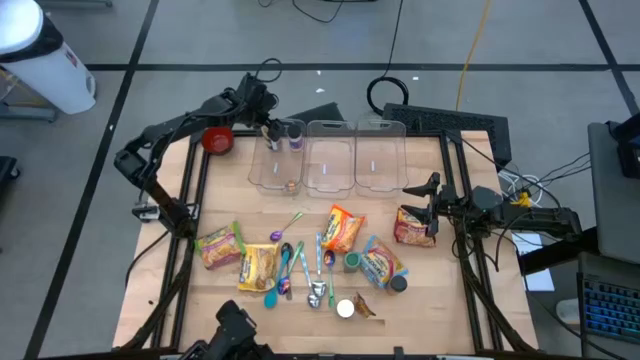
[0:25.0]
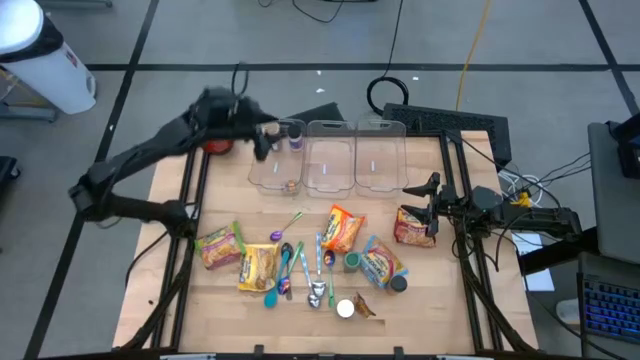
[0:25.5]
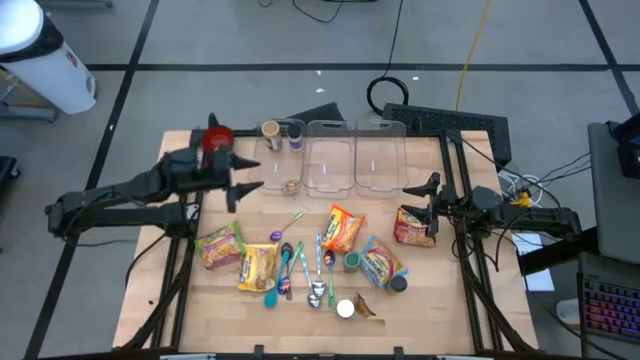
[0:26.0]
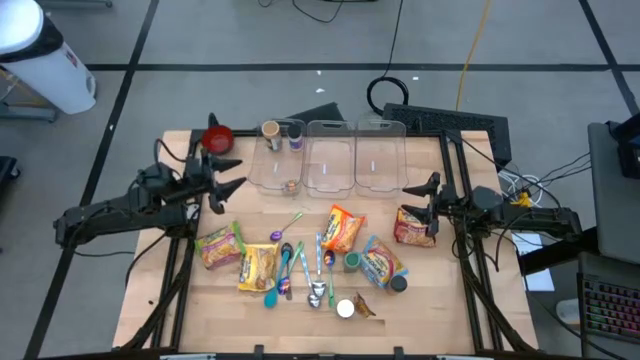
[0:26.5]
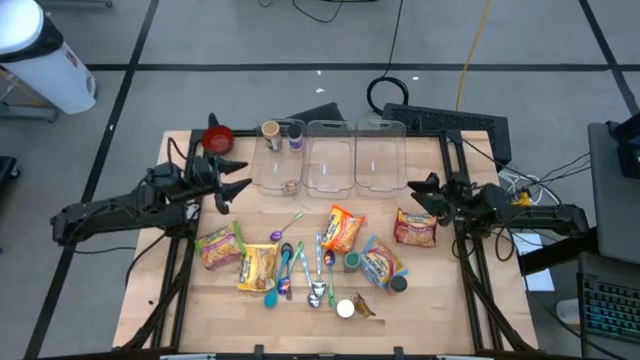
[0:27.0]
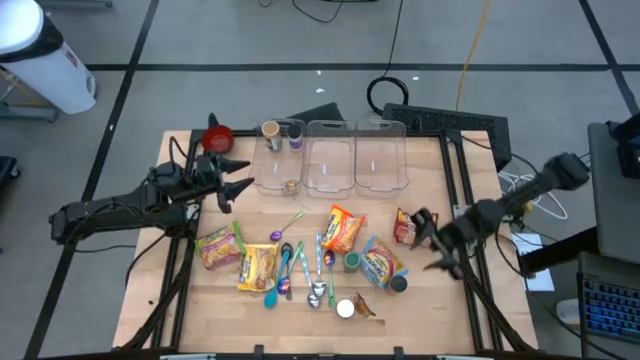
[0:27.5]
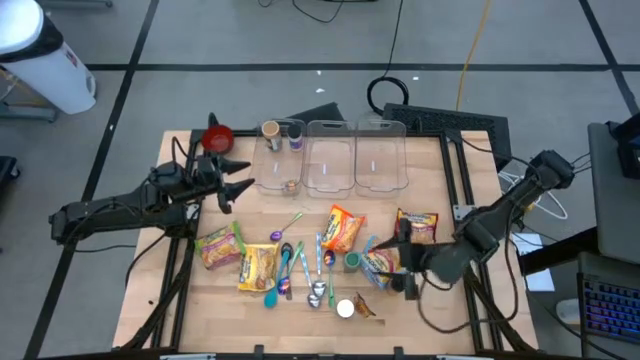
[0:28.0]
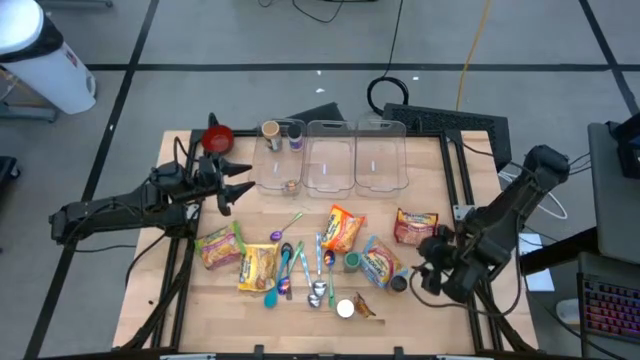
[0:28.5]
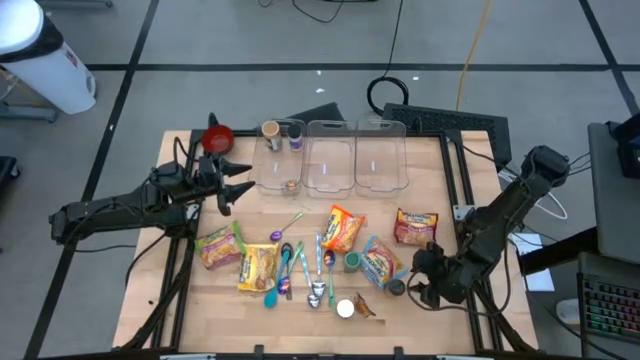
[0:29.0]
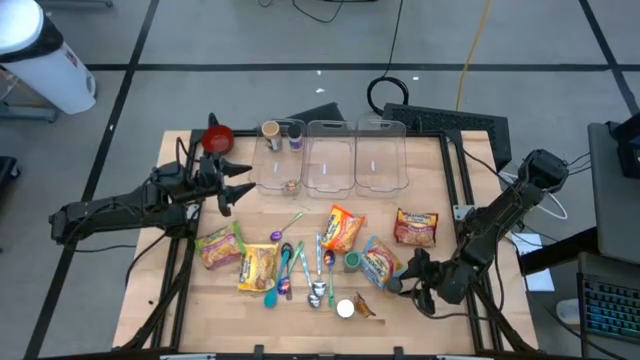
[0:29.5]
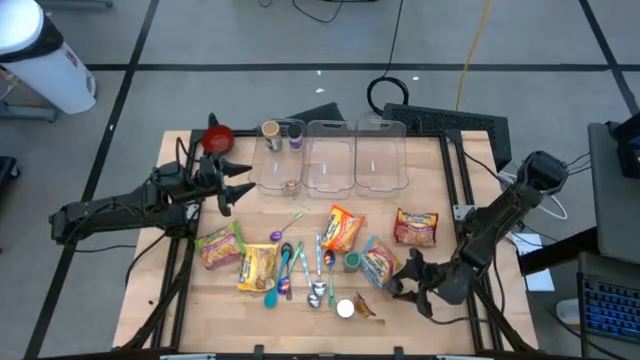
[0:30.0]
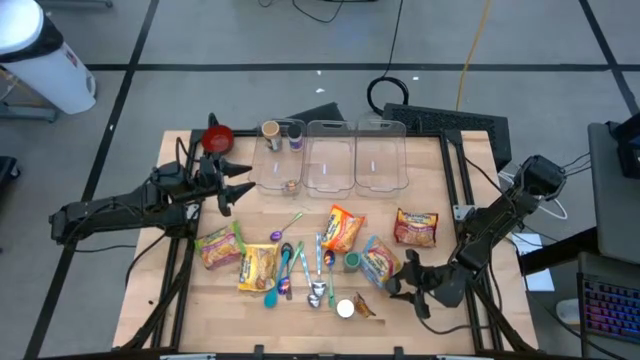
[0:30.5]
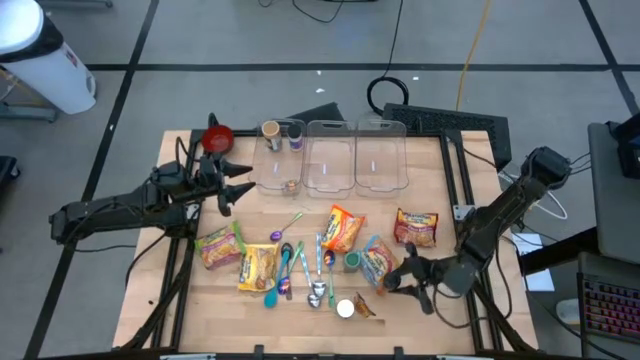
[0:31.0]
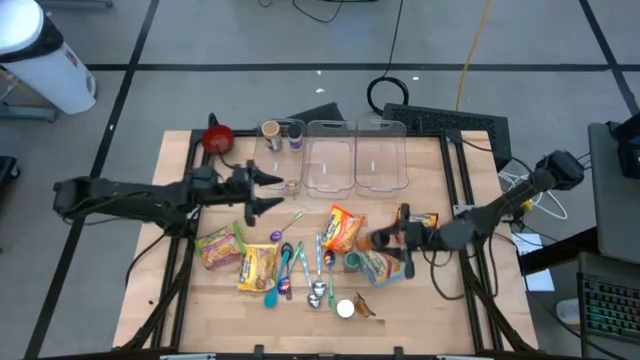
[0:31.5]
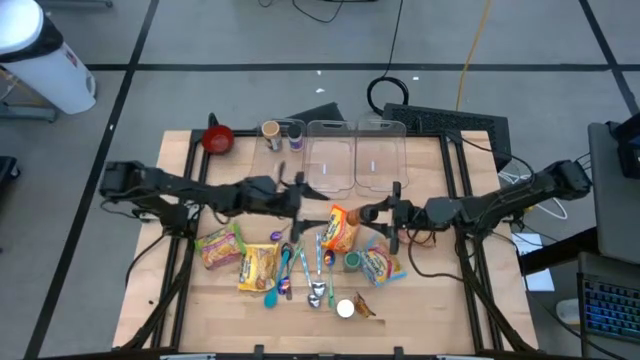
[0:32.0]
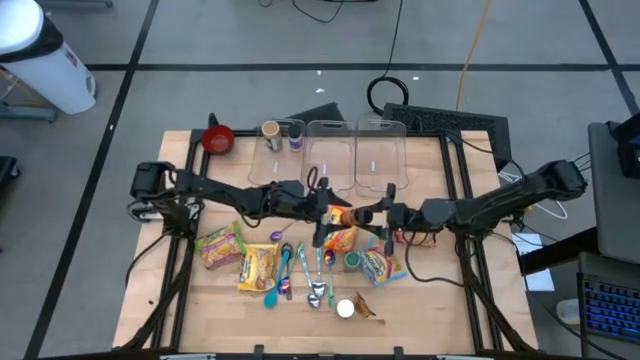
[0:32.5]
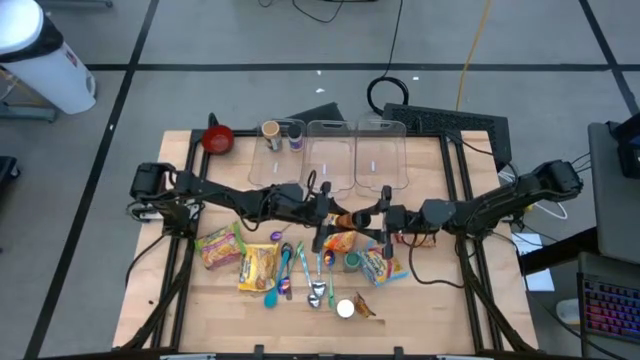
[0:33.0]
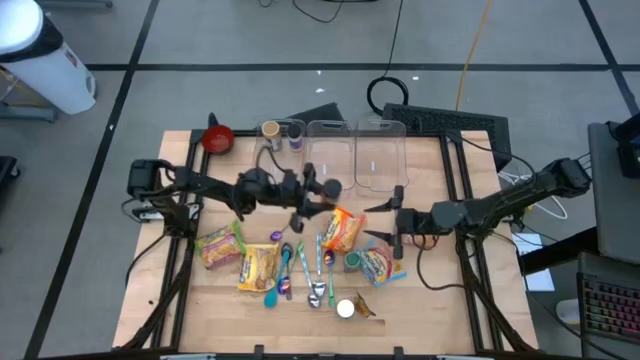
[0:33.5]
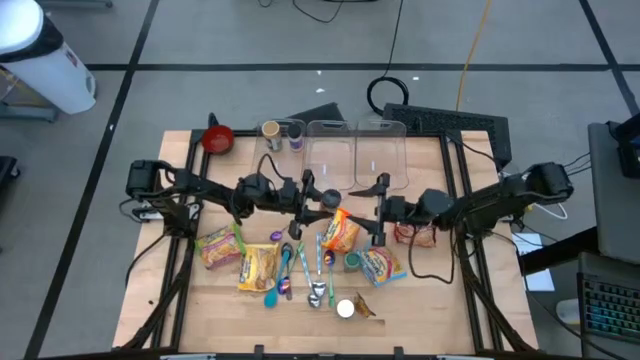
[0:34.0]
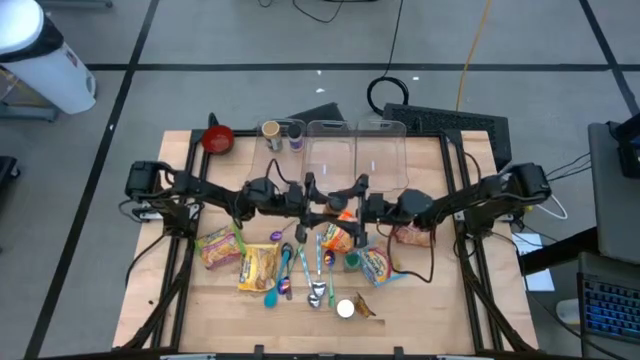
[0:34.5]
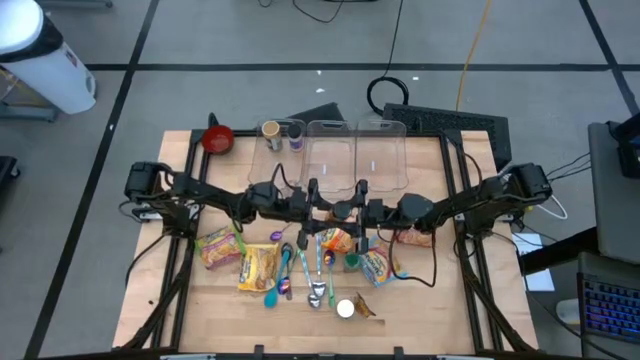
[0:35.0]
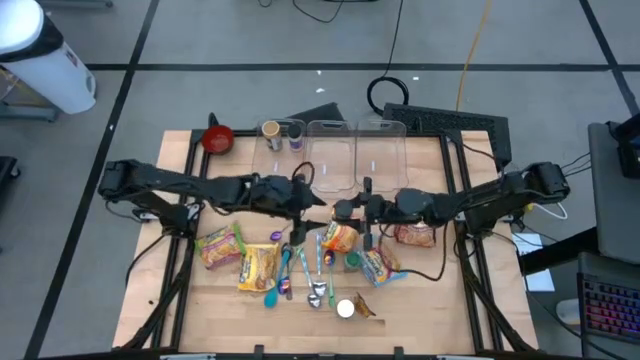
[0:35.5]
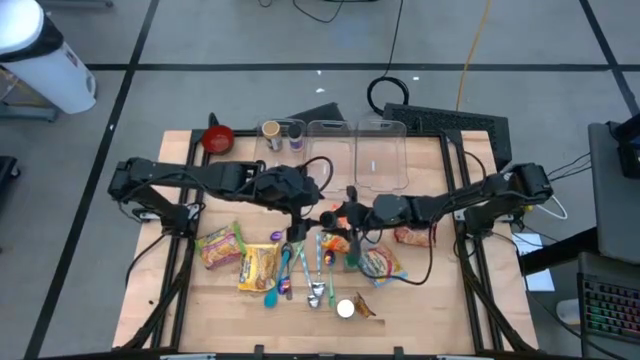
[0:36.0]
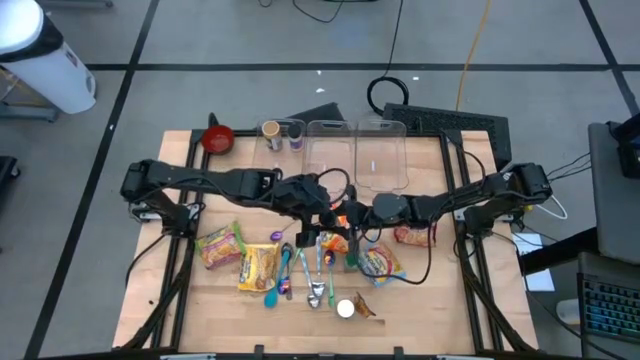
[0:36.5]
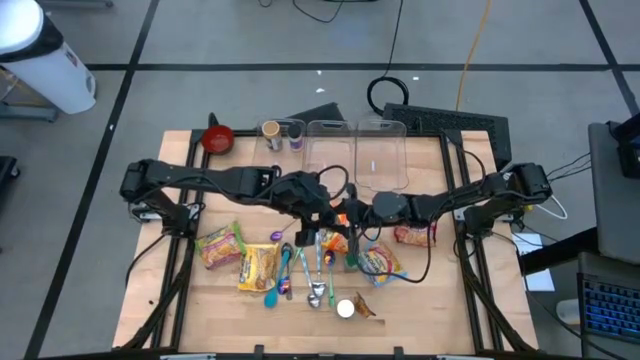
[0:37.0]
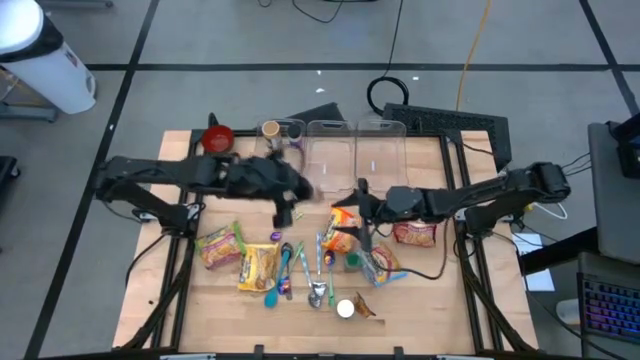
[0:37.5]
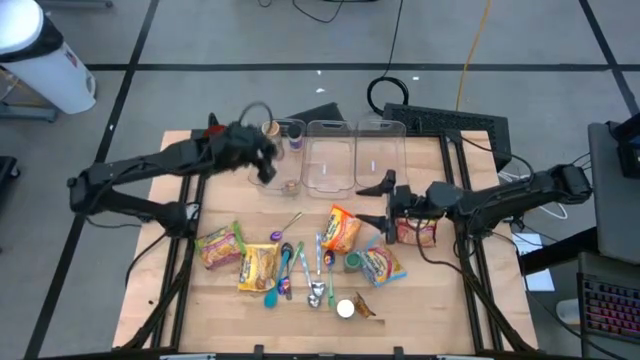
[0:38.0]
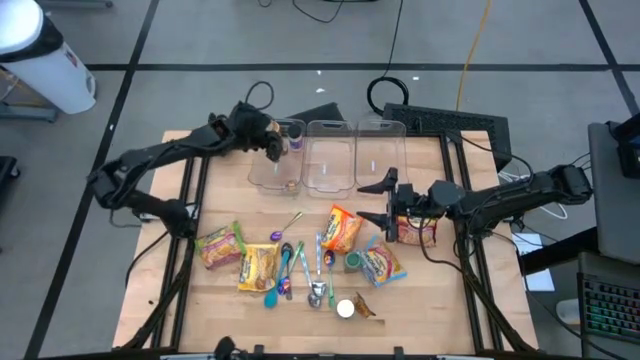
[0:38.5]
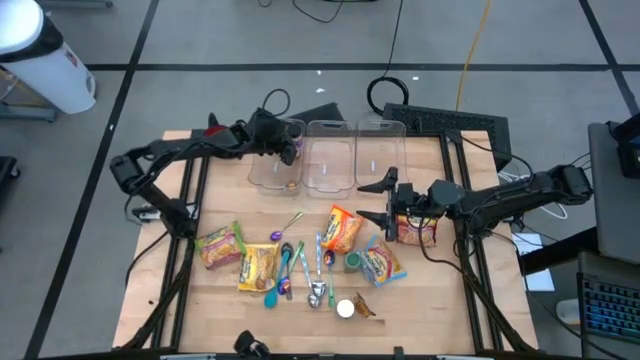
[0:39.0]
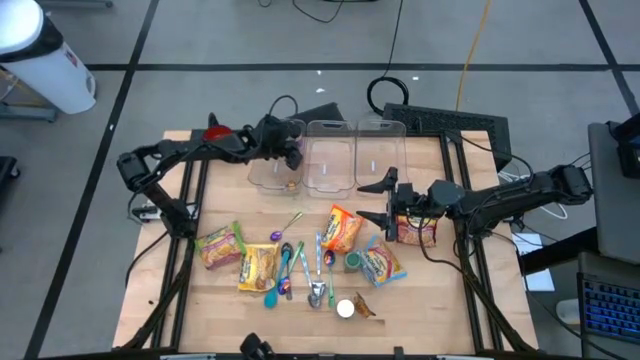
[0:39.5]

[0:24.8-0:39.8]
Task: Pick & Place Food Item
Put the orange seasoning bottle into the left transparent bin

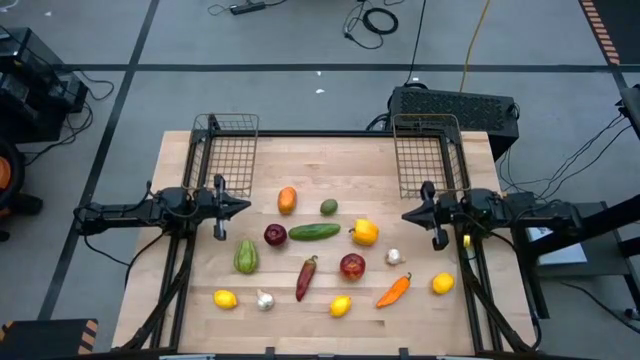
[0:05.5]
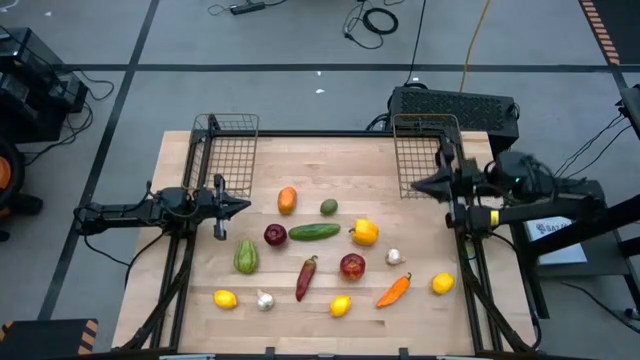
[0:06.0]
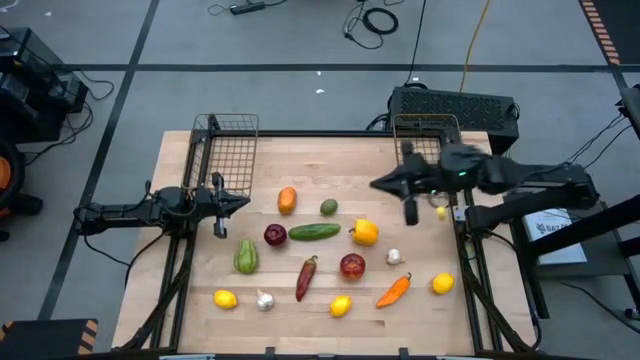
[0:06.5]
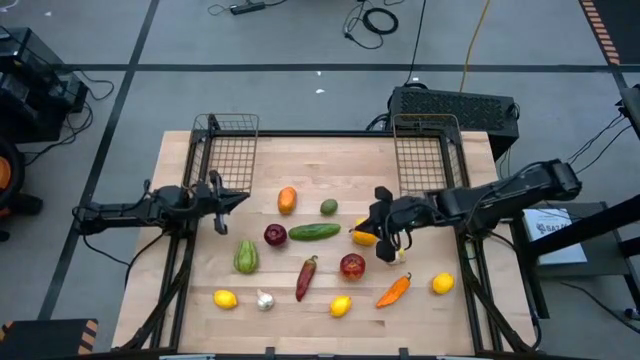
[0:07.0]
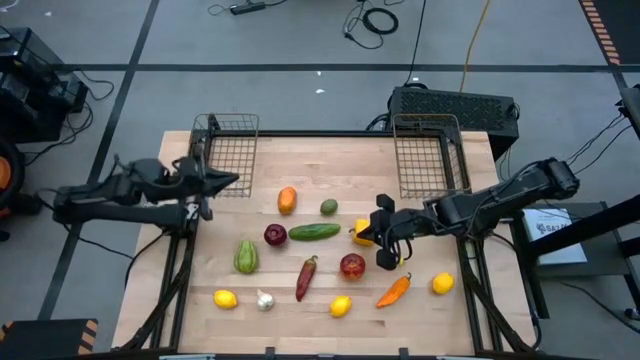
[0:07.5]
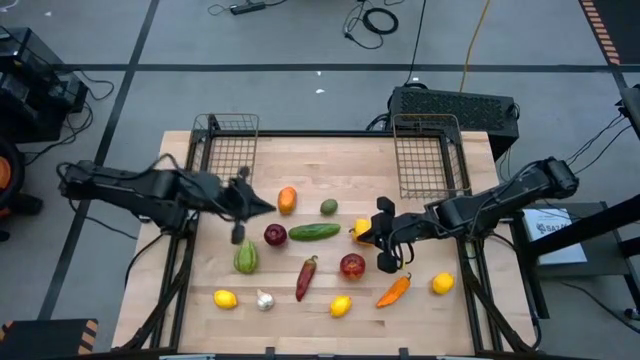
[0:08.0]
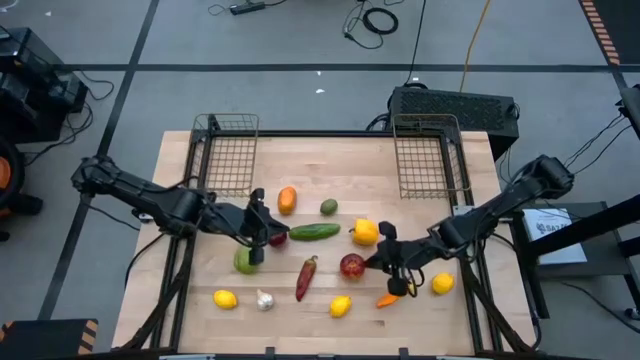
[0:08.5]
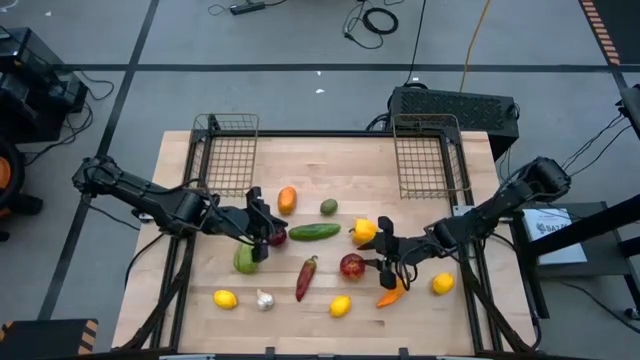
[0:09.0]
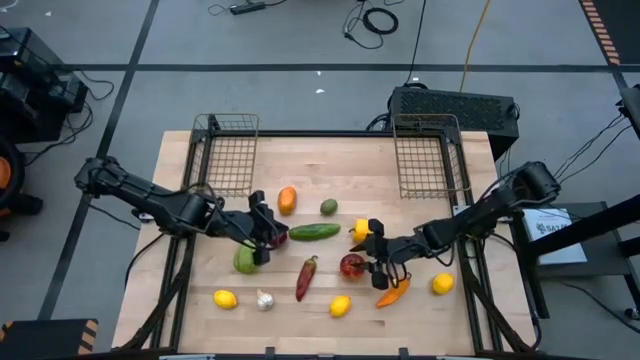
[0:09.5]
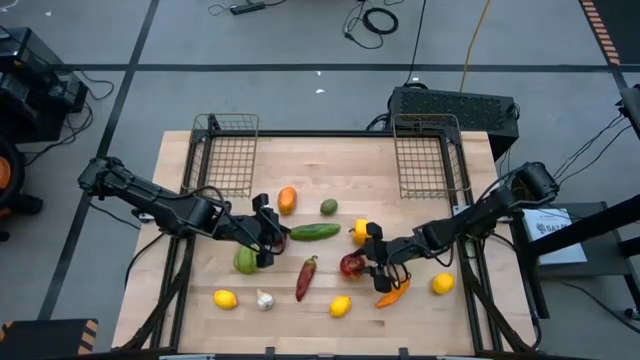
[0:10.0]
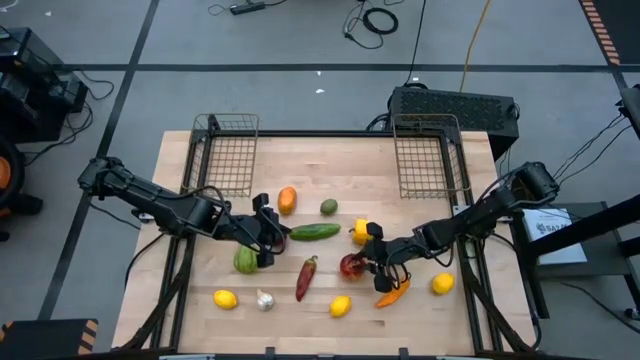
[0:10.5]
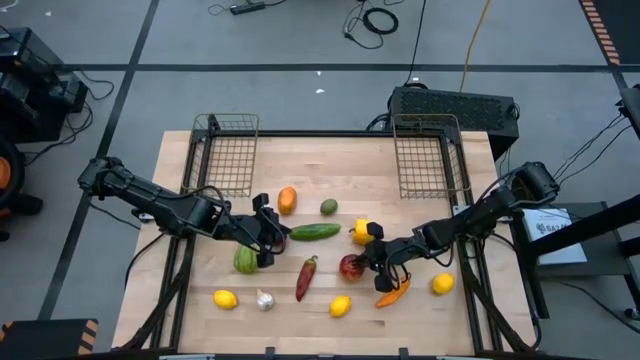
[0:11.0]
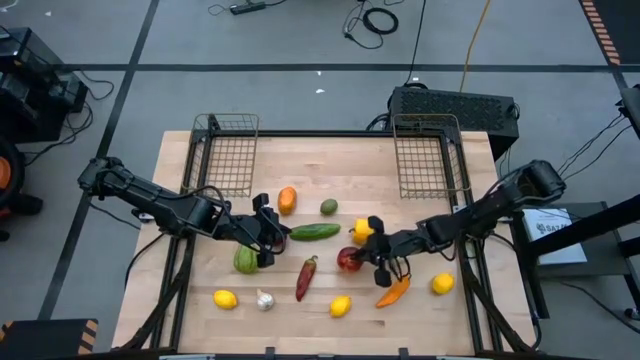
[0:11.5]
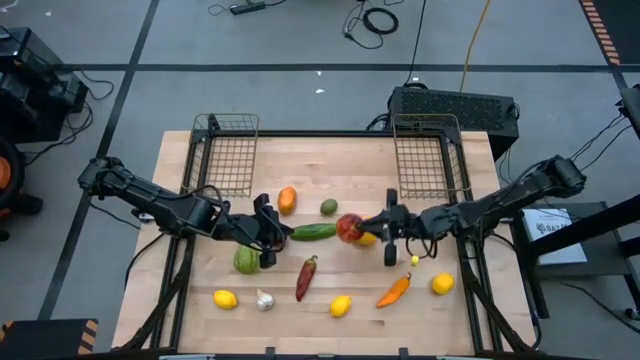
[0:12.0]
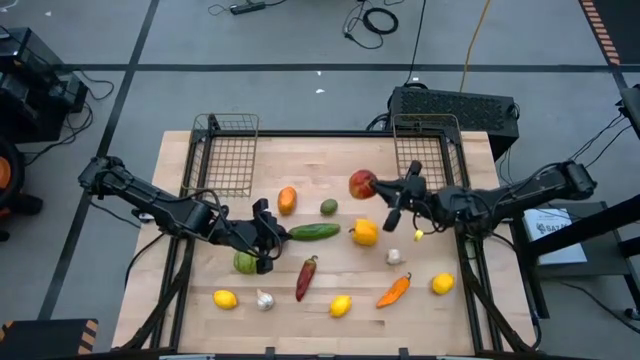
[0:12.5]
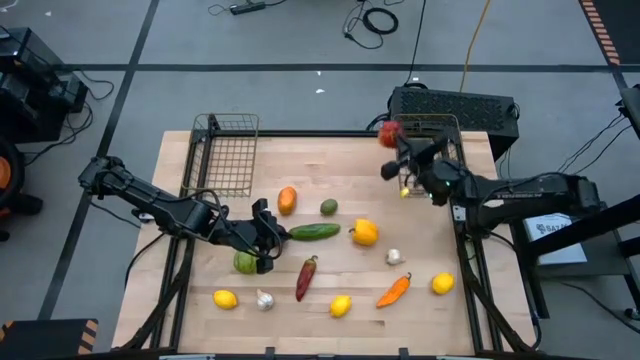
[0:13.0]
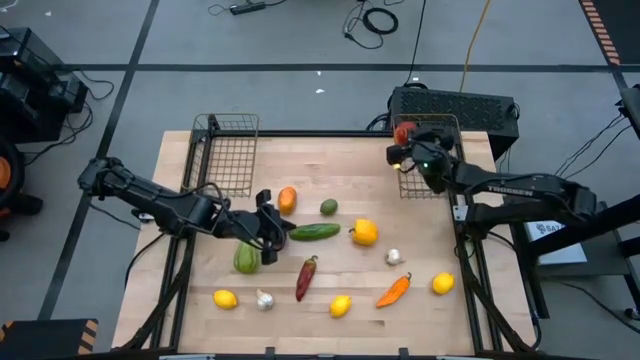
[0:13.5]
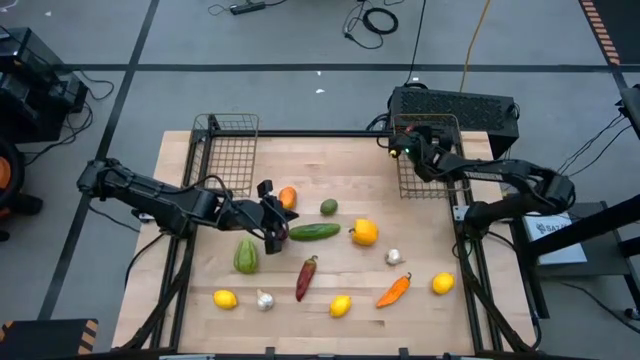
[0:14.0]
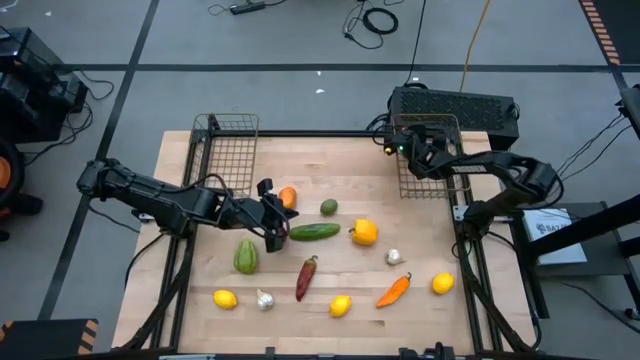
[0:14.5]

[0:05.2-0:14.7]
Task: Sort produce into baskets
Put the right red apple into the right wire basket
